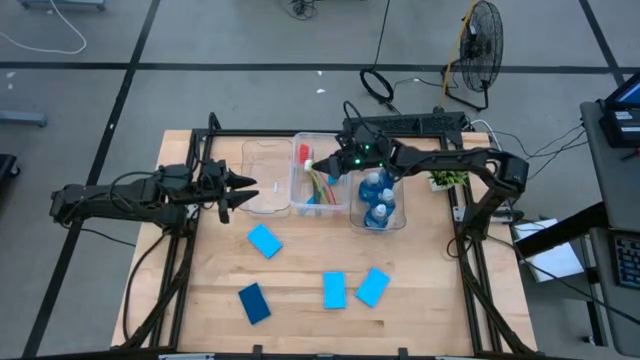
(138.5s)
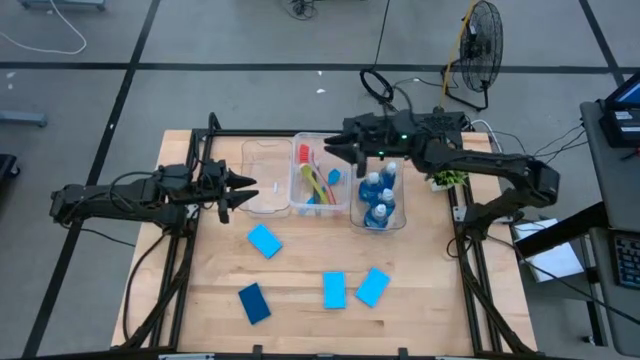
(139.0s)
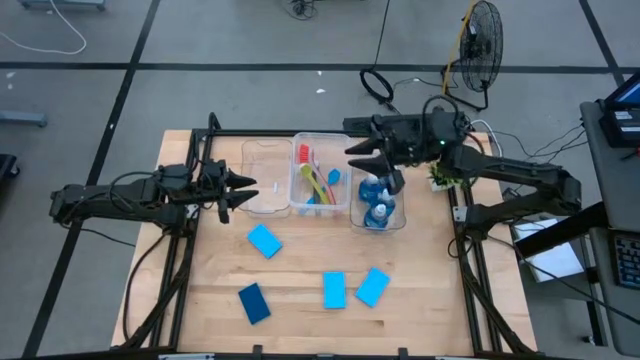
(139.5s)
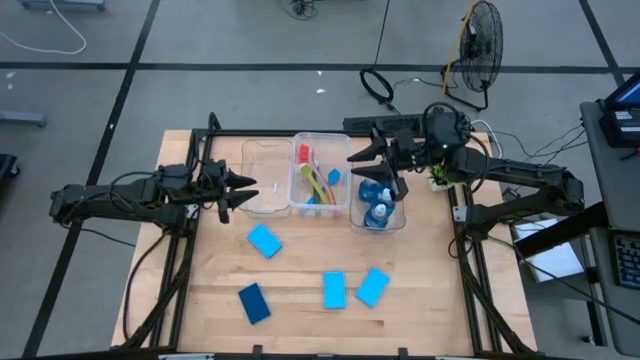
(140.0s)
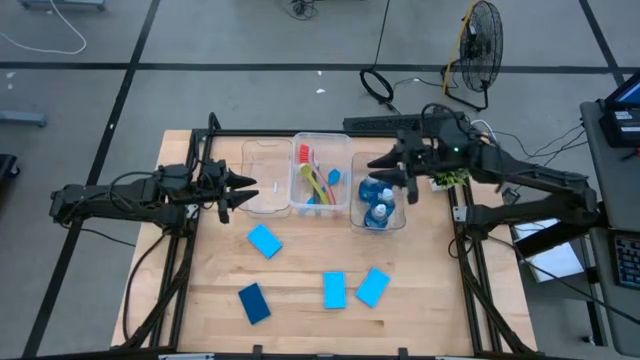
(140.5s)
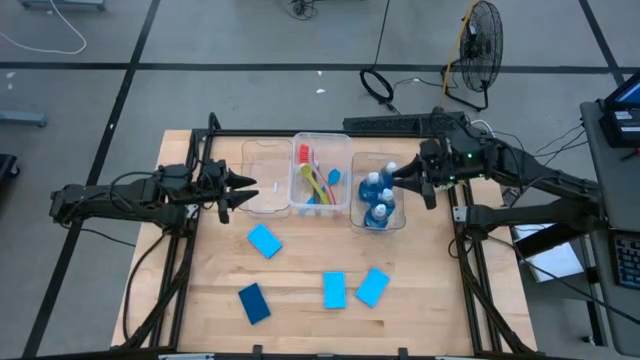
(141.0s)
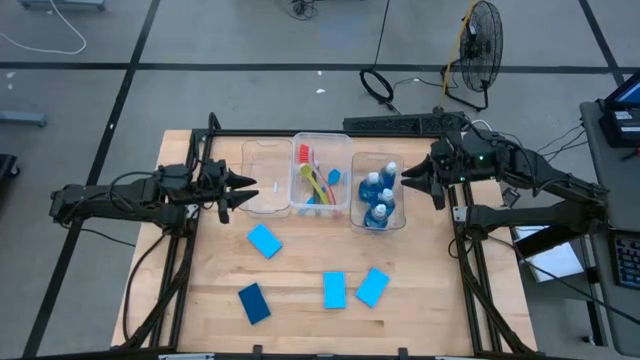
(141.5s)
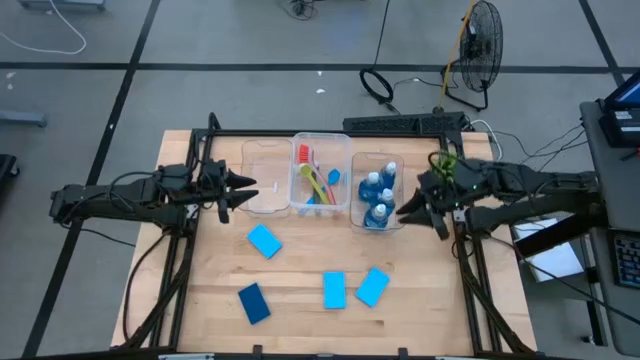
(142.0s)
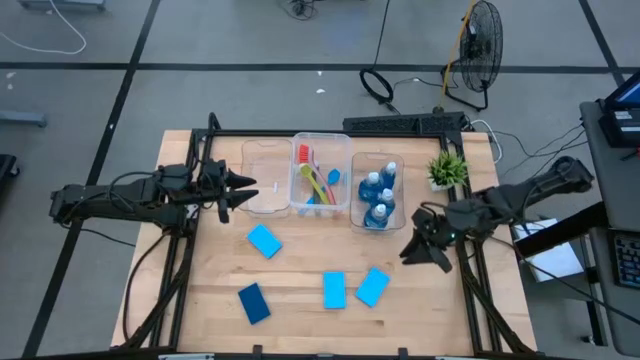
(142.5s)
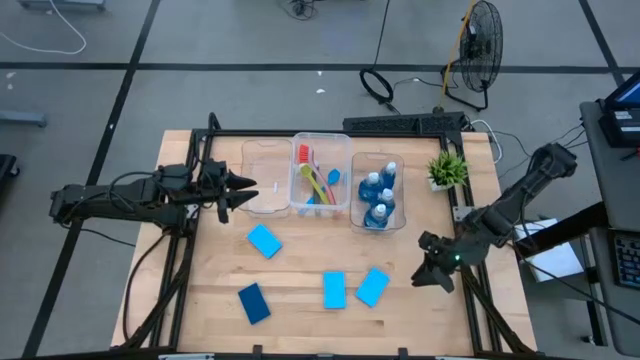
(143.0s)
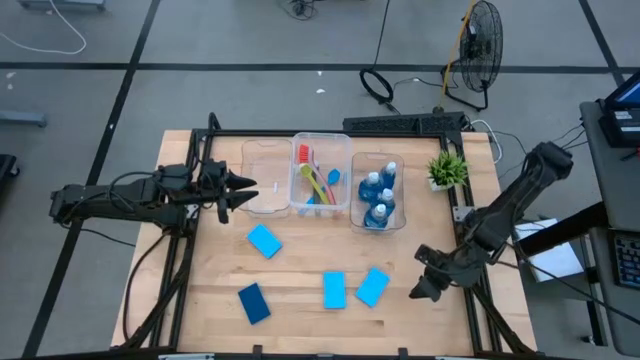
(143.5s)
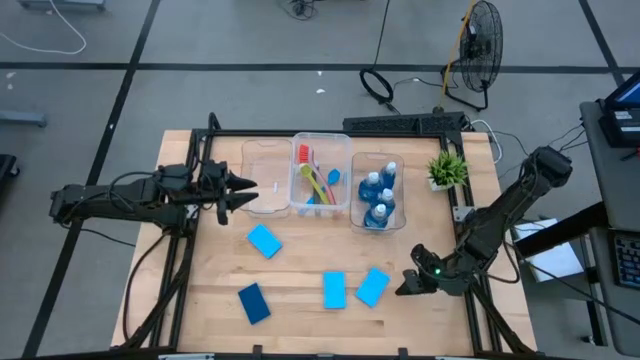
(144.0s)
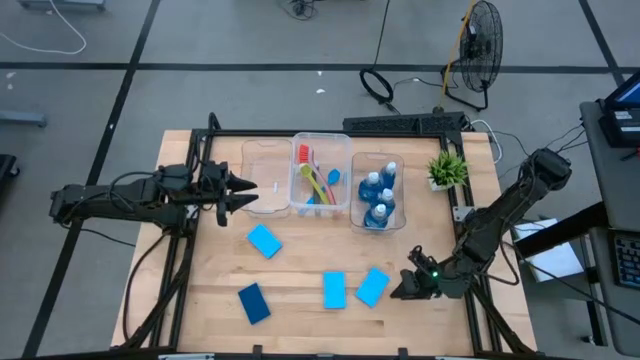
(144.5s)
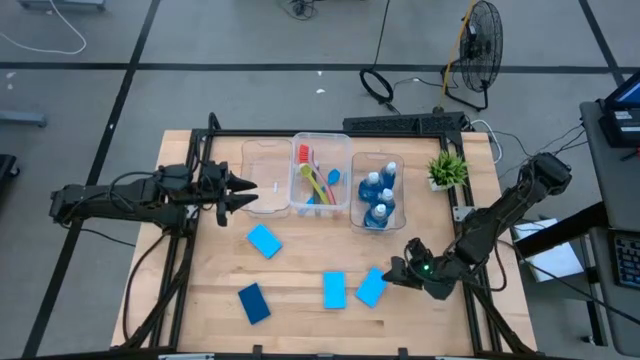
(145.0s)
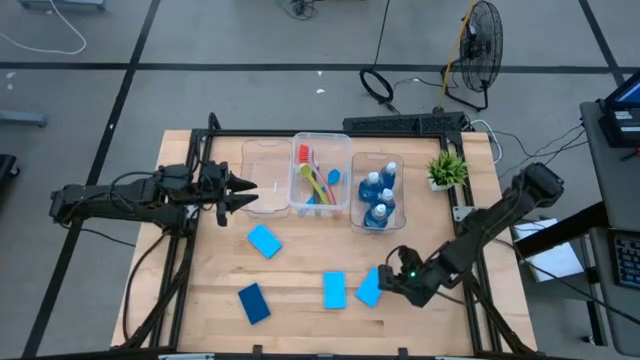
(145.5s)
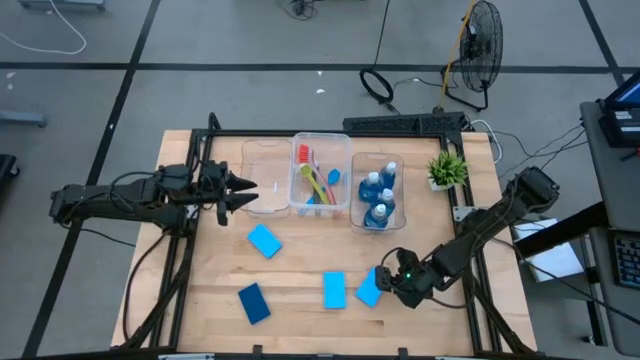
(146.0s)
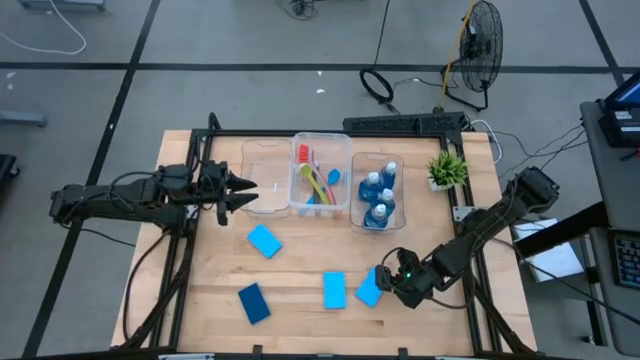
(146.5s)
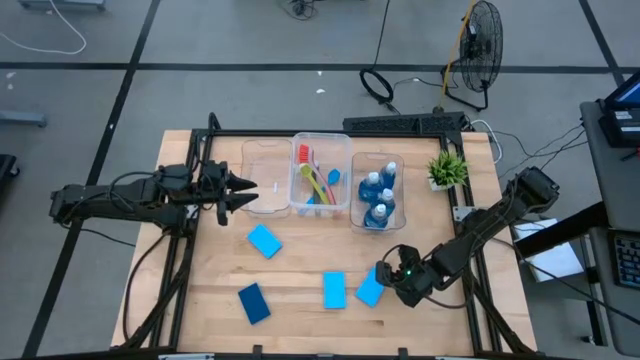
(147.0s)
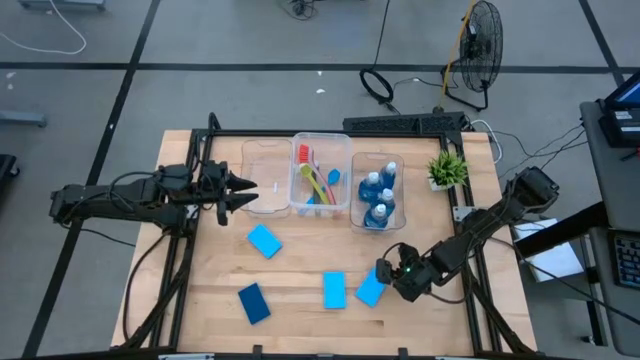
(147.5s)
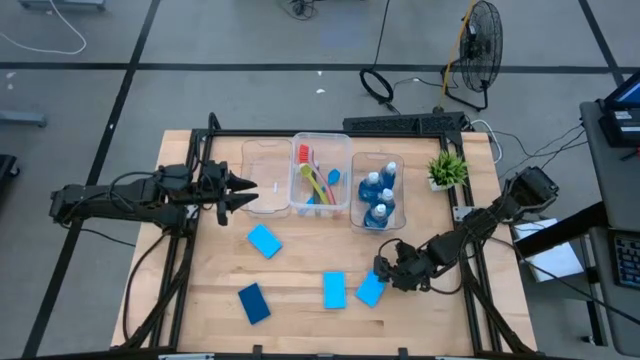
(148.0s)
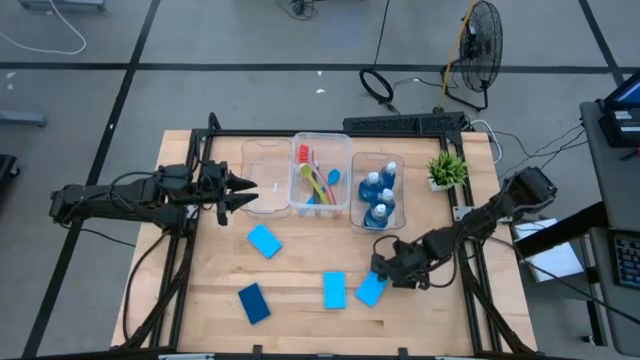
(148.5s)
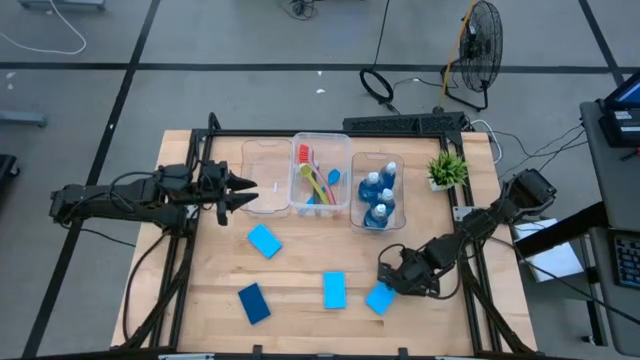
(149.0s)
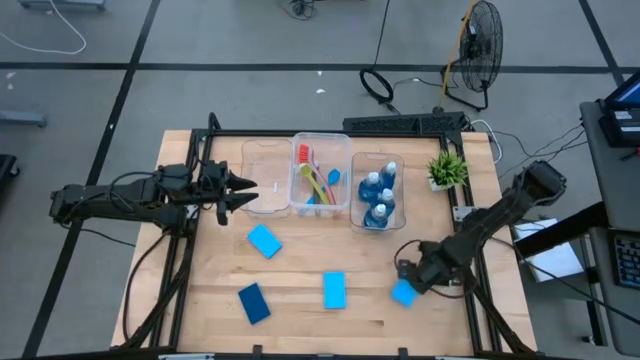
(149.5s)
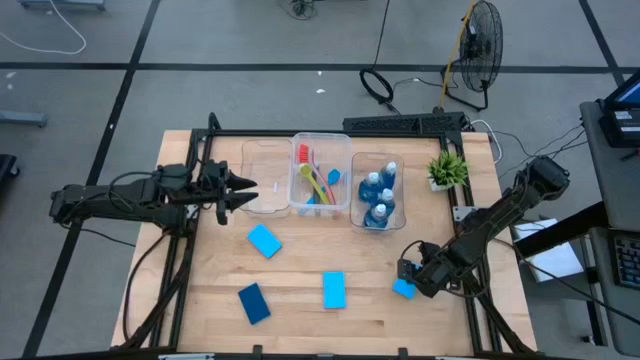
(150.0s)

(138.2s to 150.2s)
Task: Pick & Place Kitchen Sink Supplies
Put the light blue sponge into the left transparent bin

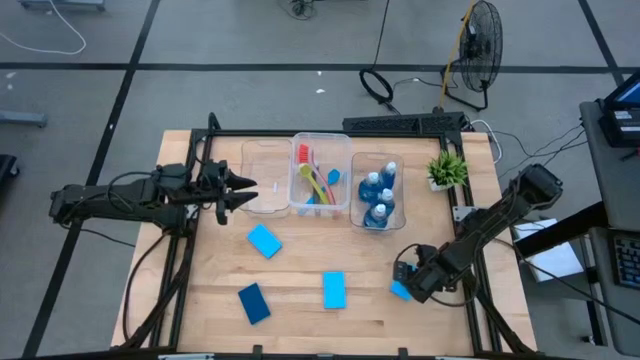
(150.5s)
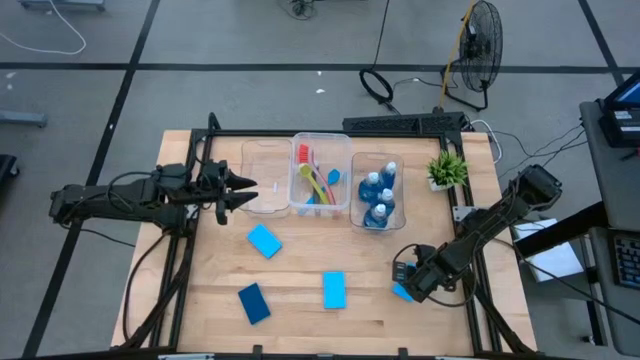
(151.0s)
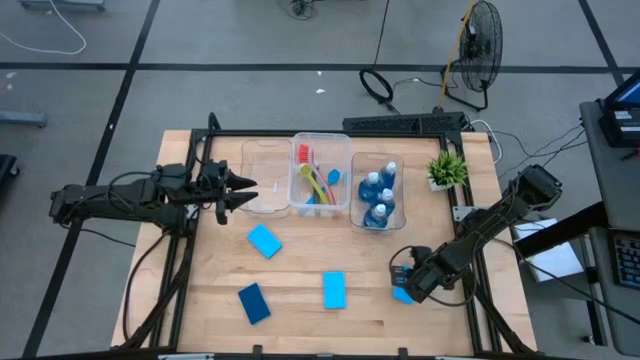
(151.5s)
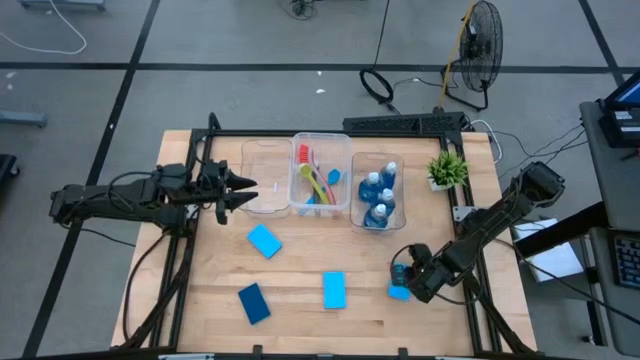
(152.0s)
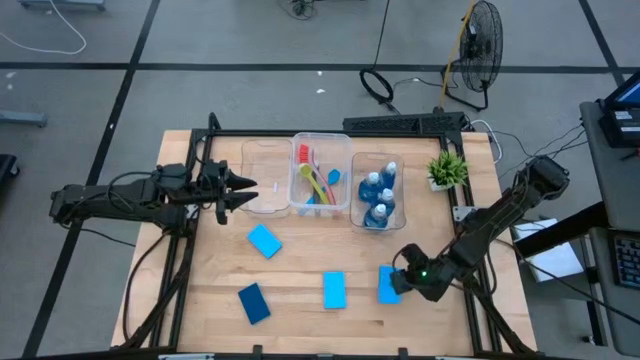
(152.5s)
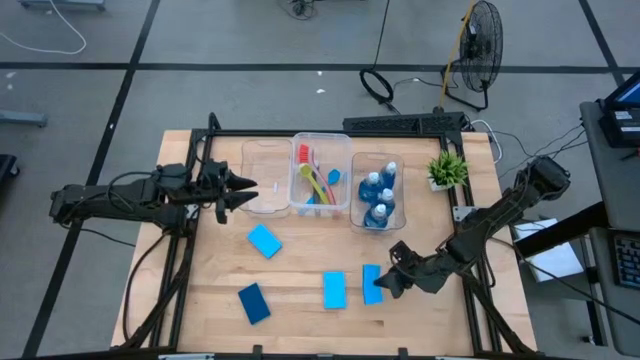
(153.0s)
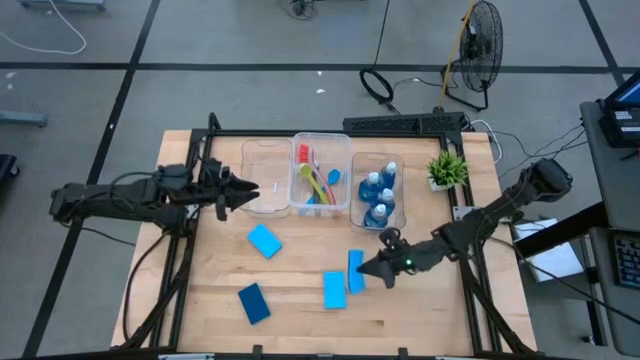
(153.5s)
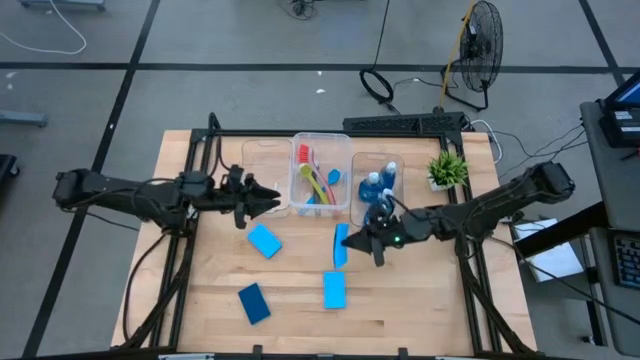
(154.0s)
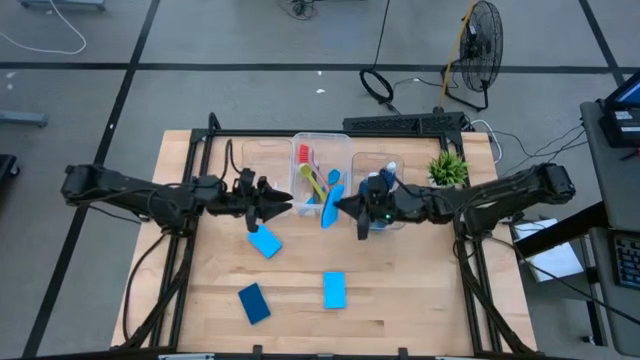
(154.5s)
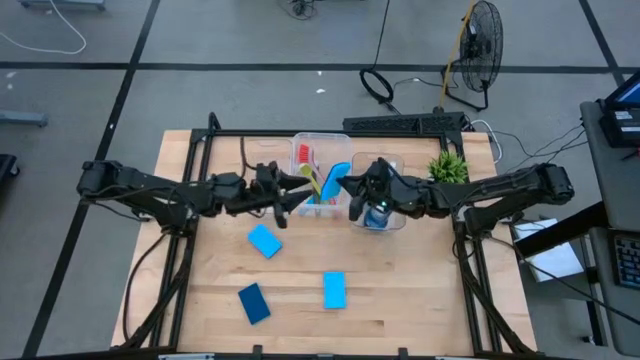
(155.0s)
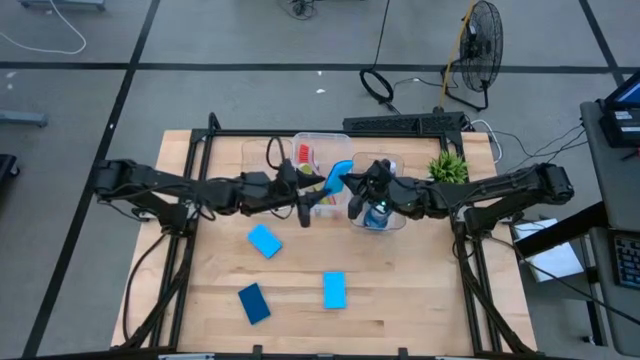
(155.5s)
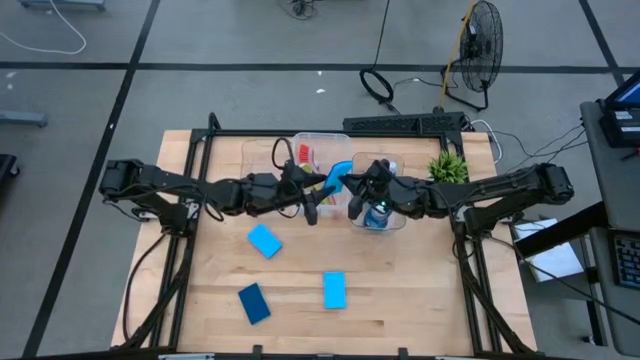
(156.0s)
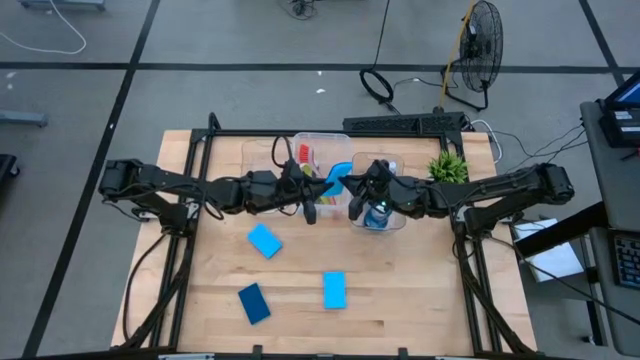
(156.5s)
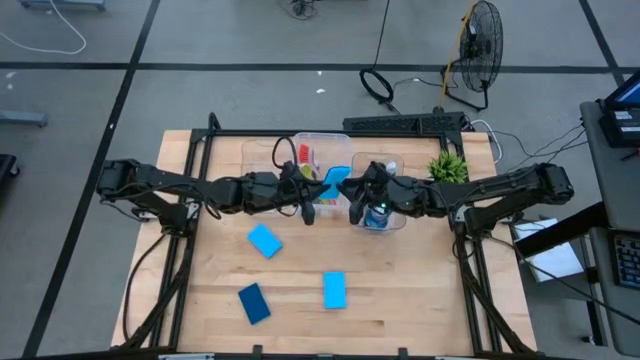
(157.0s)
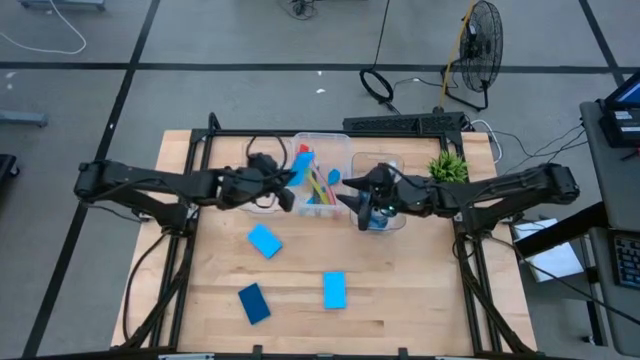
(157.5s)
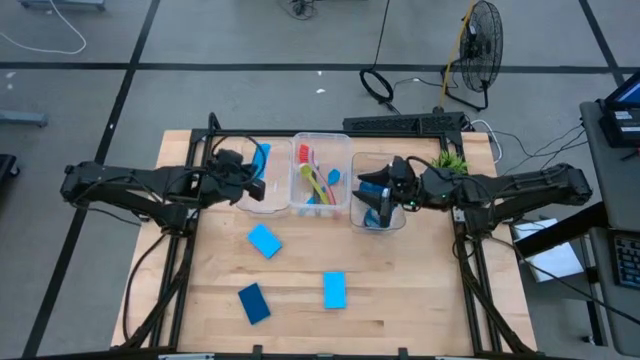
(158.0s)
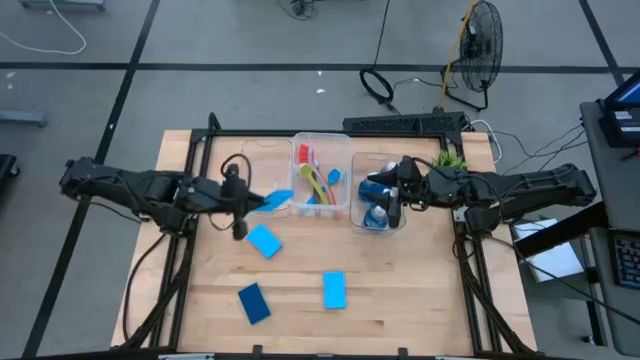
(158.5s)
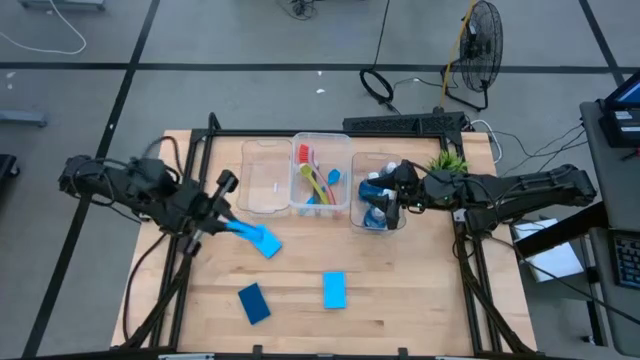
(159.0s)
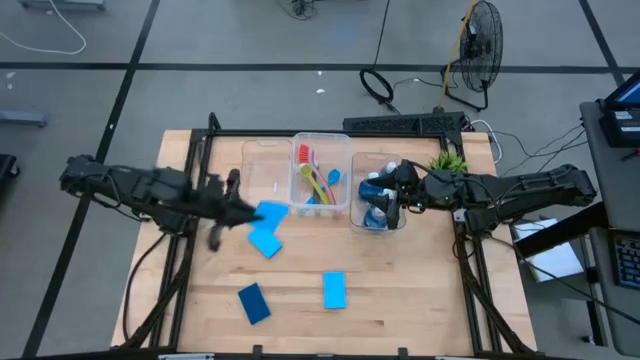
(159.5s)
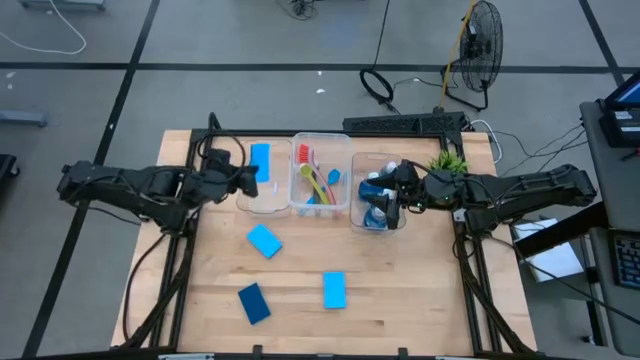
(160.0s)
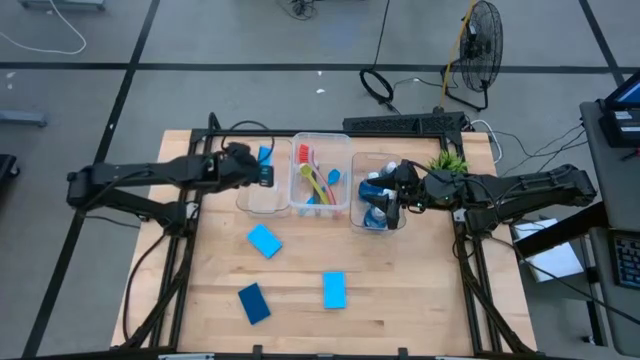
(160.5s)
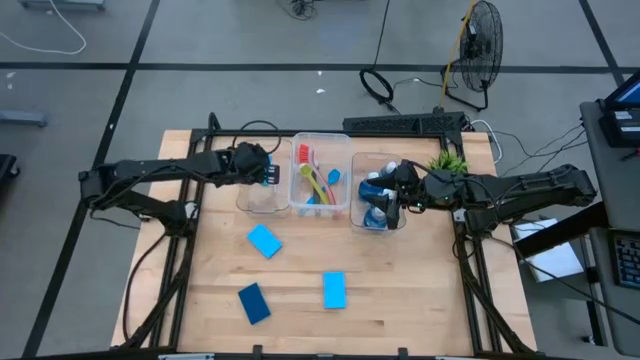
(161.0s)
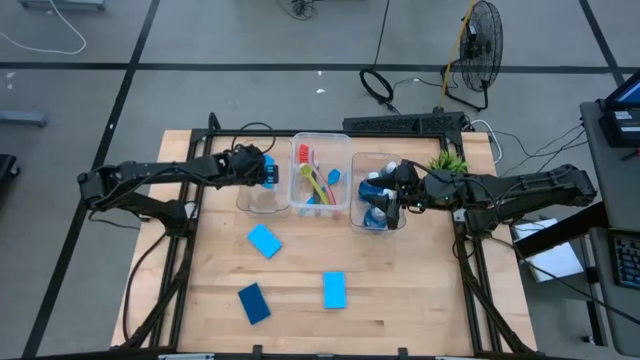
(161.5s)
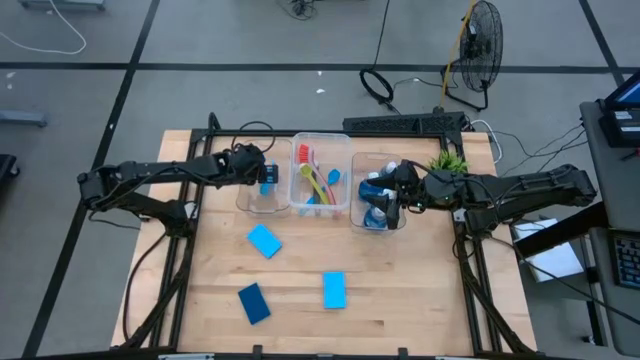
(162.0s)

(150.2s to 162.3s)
Put the light blue sponge into the left transparent bin
